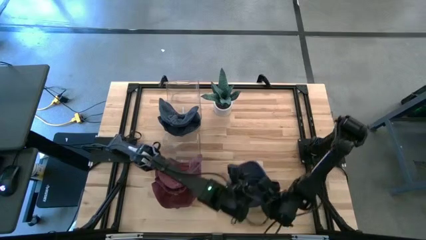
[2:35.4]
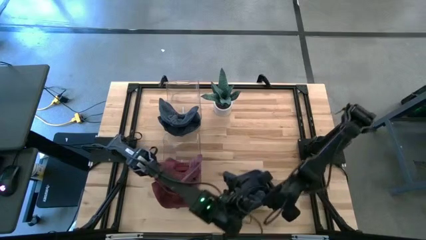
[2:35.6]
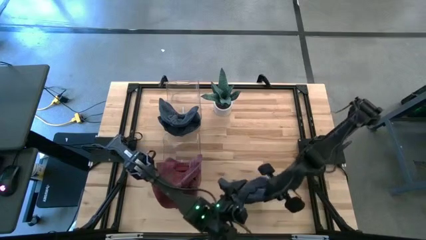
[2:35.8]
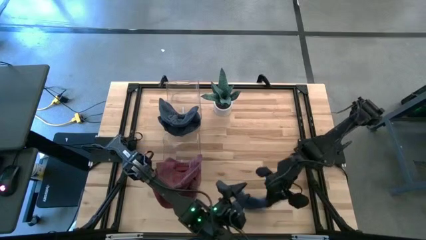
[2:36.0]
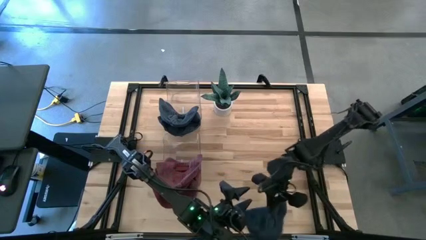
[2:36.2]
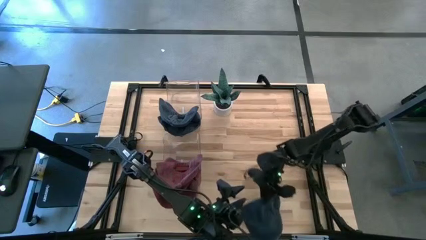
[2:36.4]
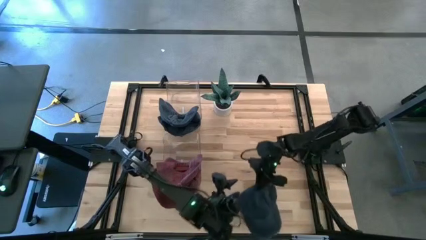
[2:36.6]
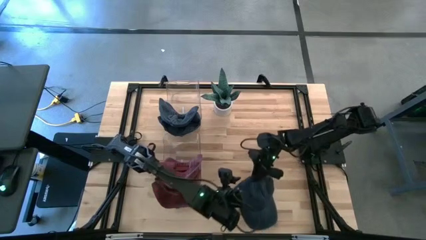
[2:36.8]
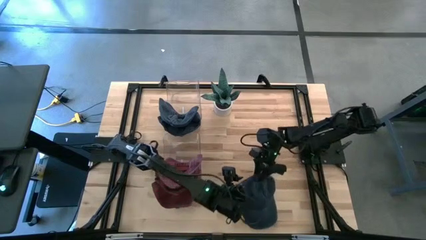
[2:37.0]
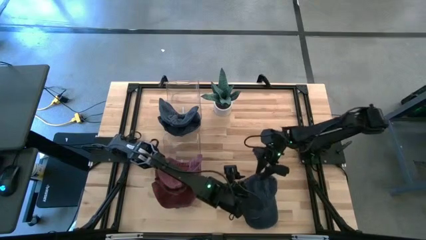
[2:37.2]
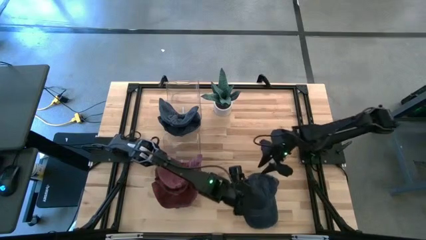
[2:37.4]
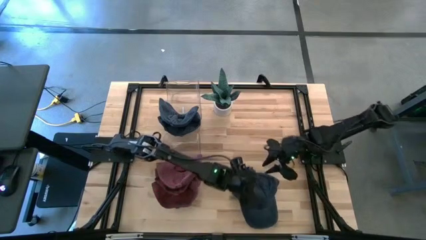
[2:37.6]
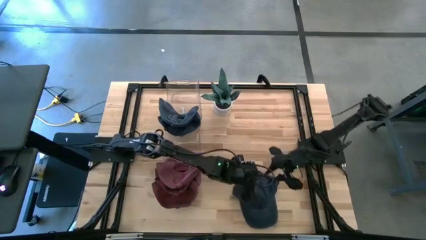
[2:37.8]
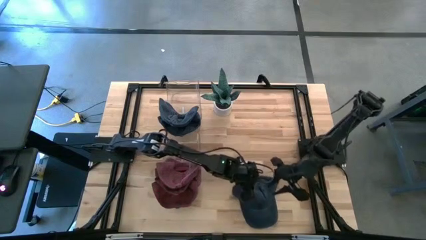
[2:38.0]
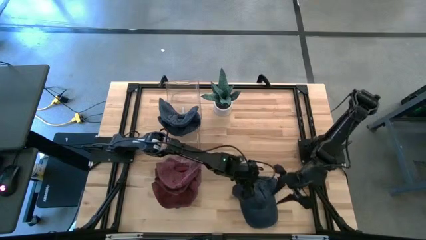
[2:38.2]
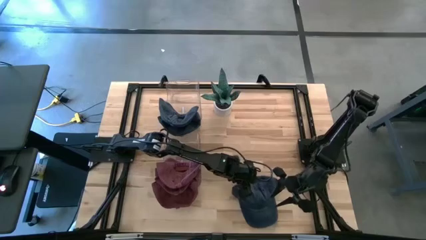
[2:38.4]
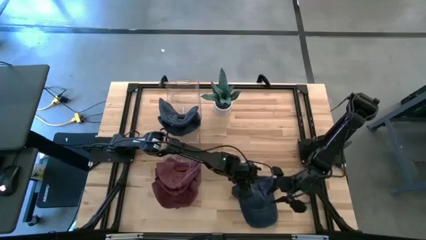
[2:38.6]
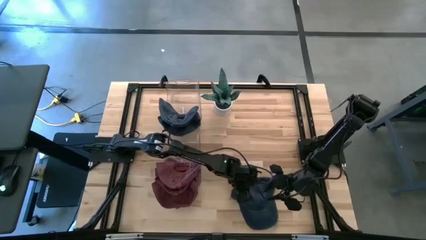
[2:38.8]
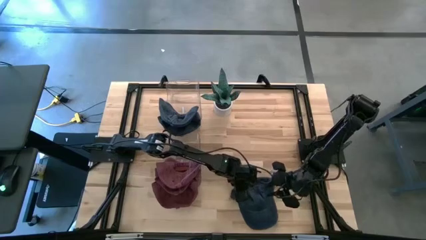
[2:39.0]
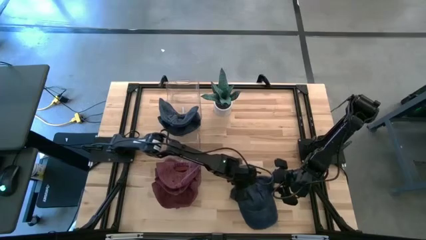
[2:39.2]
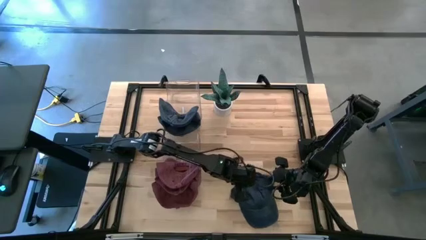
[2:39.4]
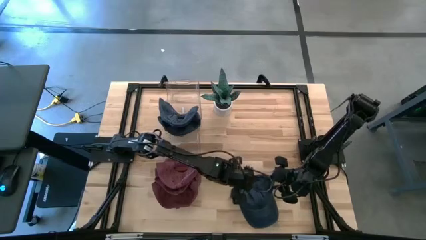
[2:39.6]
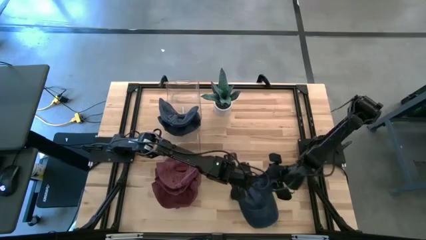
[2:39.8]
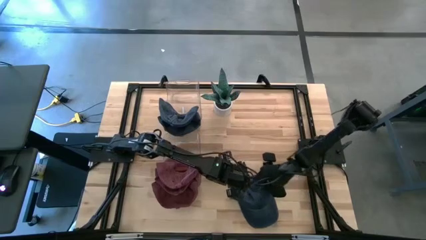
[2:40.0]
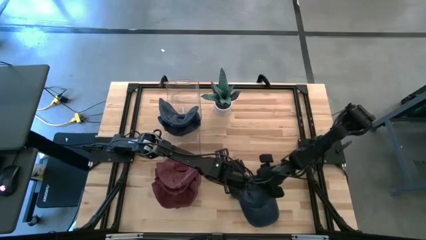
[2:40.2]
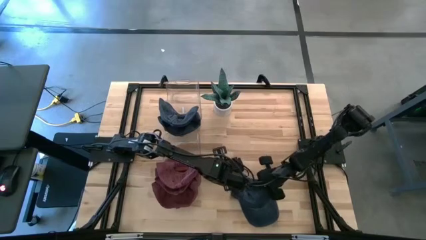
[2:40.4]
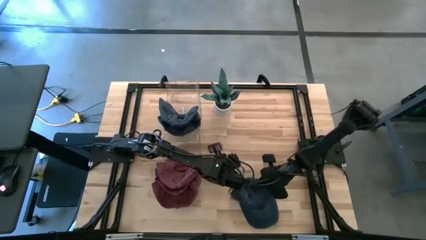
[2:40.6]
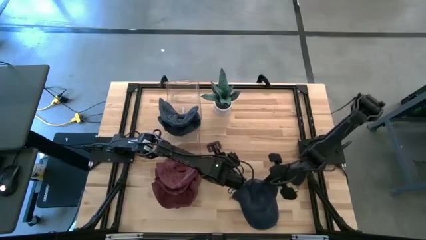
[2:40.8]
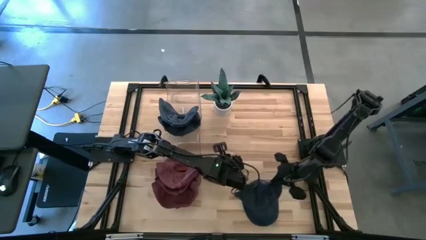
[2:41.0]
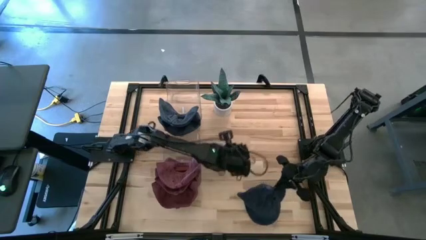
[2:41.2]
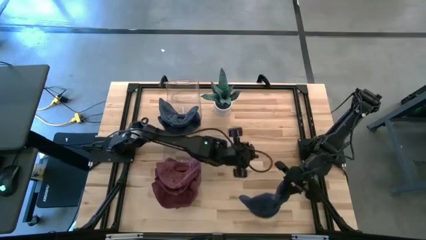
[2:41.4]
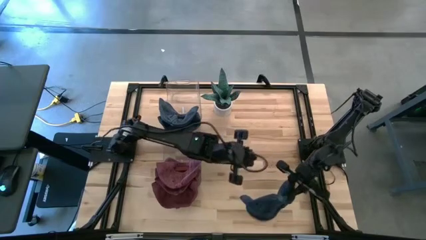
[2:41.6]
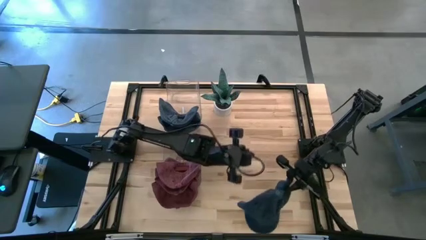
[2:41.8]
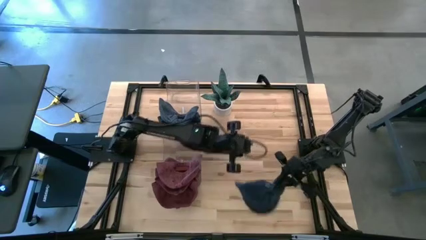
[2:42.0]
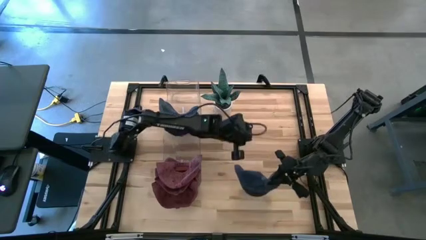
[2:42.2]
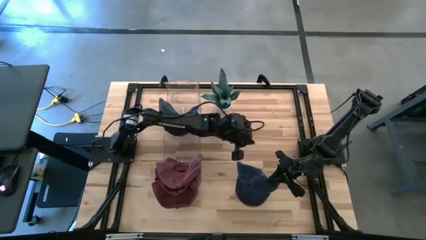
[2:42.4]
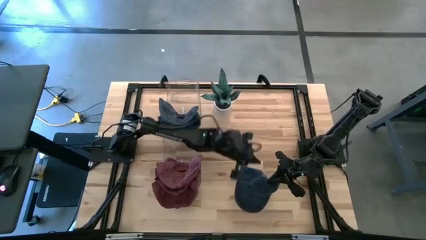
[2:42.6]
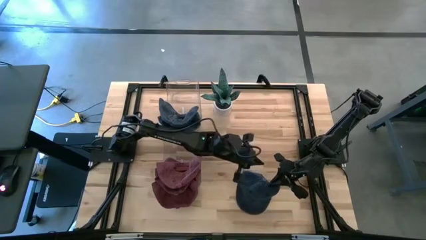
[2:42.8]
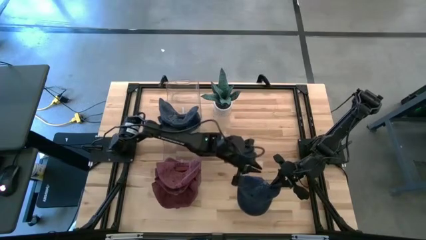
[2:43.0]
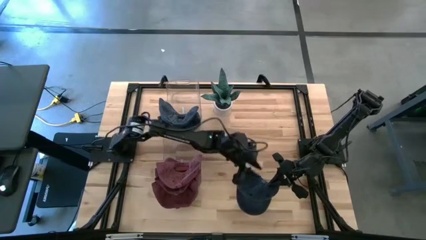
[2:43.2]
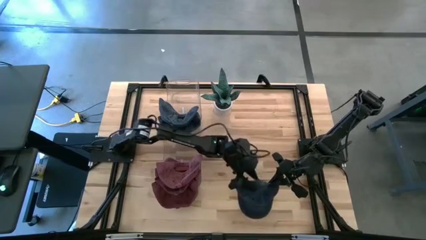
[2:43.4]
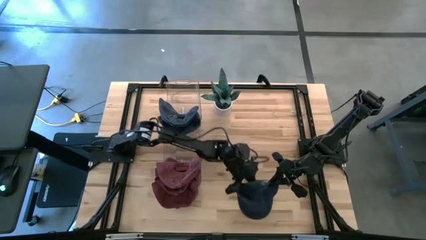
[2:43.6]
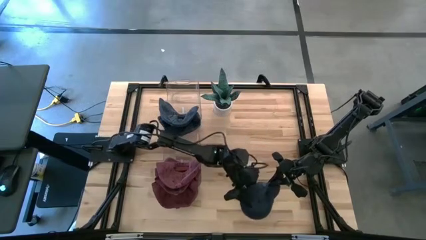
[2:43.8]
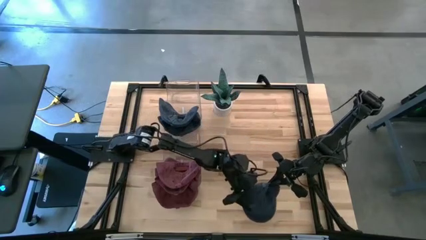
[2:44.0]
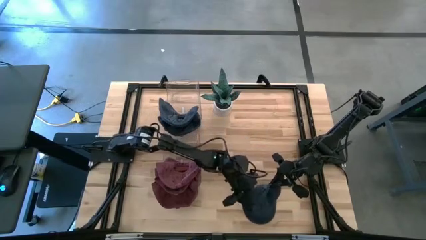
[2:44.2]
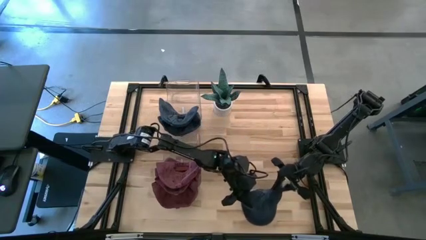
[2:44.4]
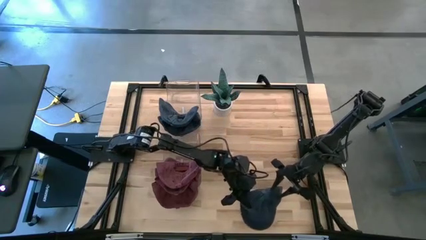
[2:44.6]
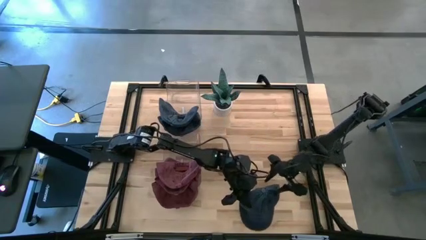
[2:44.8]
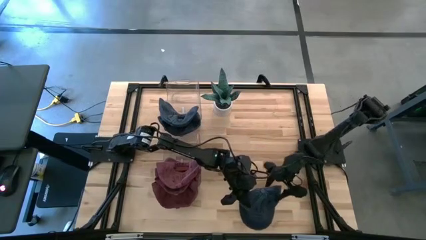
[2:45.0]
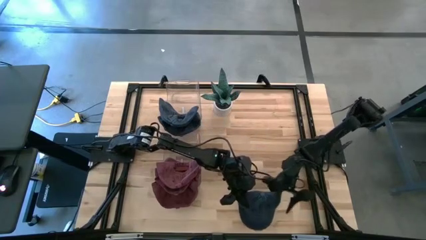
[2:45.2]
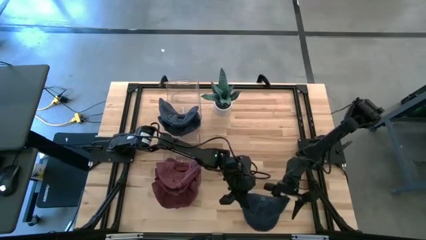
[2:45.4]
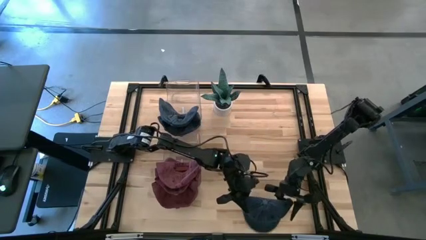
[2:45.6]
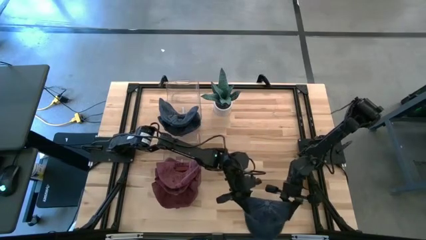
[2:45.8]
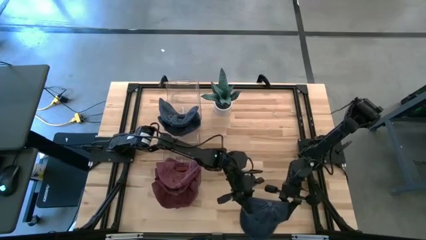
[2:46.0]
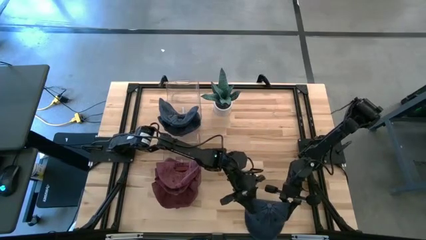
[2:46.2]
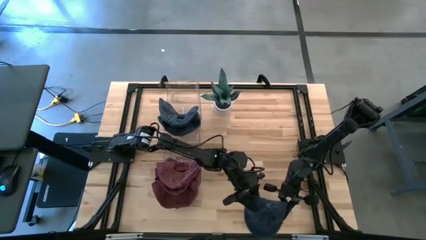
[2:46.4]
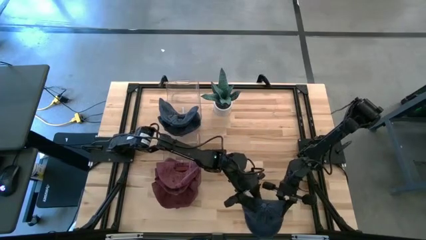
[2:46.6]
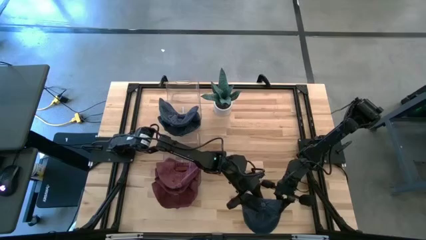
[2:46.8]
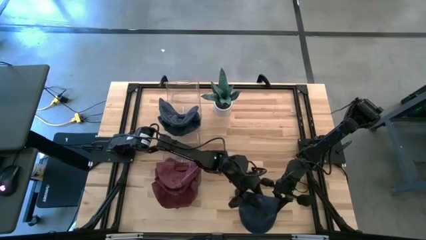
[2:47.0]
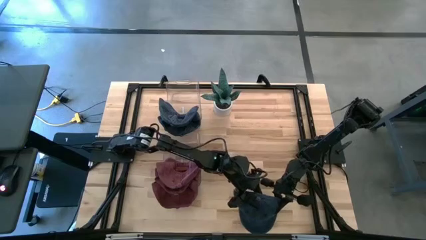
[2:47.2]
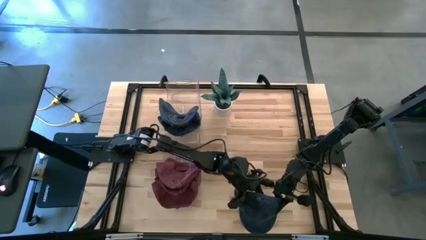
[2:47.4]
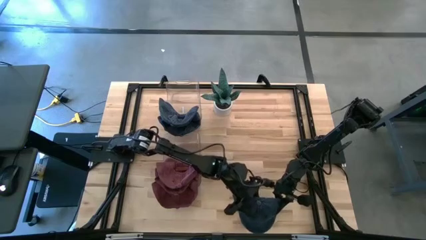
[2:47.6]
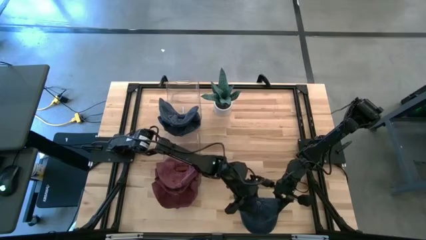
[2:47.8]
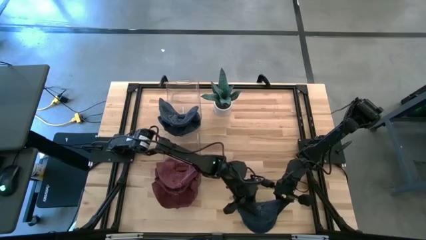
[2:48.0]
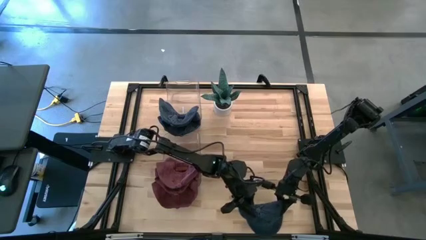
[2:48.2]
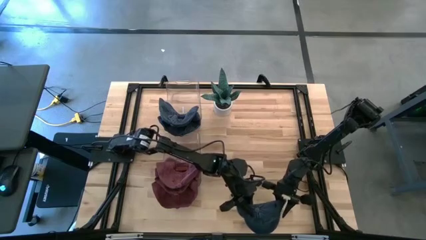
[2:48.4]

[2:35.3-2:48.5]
Task: Pick & Place hat
Put the blue cap into the top transparent bin

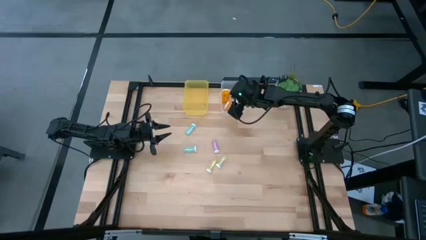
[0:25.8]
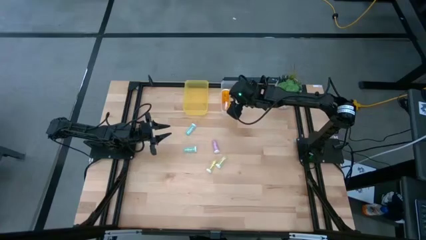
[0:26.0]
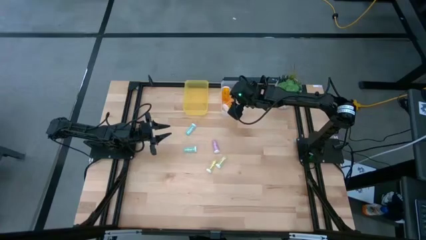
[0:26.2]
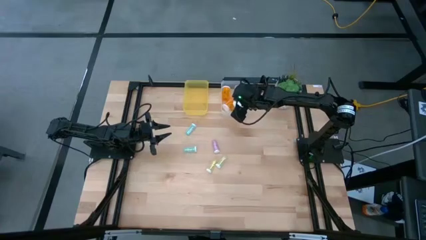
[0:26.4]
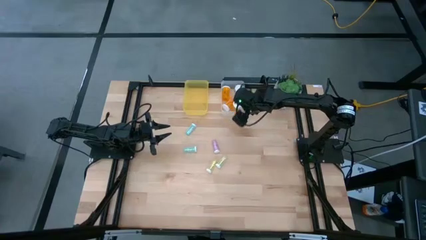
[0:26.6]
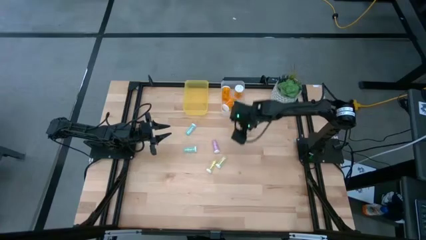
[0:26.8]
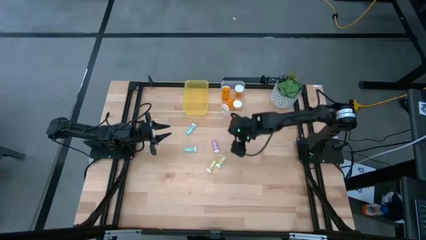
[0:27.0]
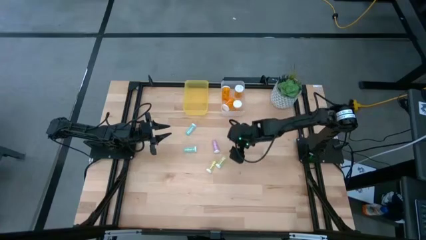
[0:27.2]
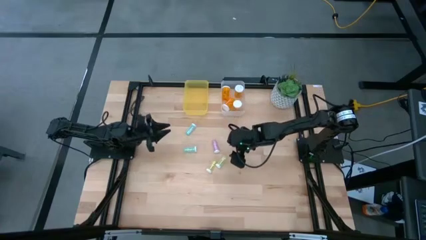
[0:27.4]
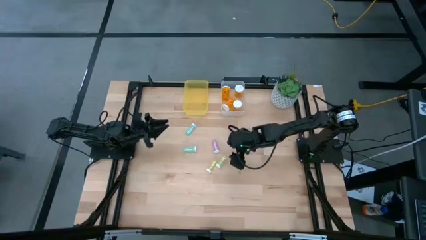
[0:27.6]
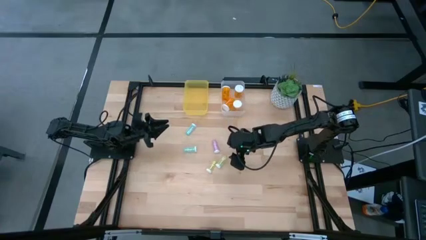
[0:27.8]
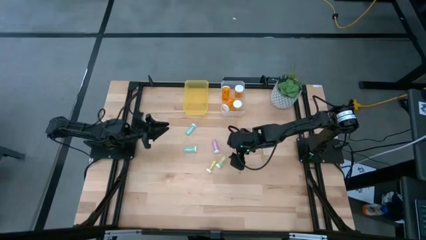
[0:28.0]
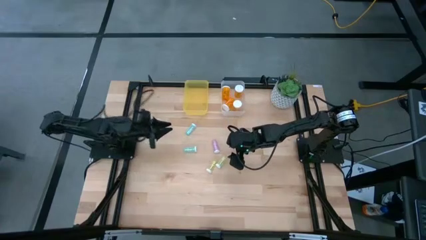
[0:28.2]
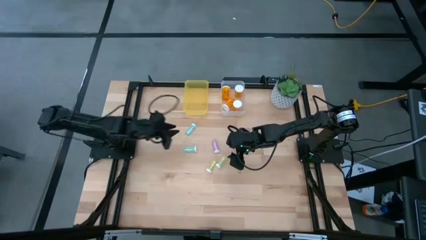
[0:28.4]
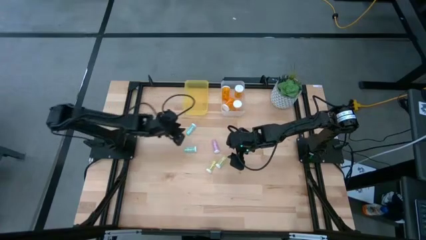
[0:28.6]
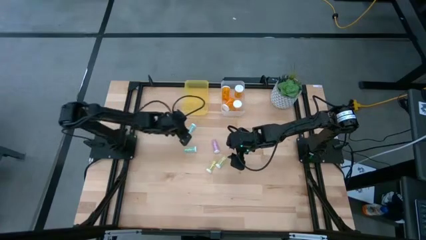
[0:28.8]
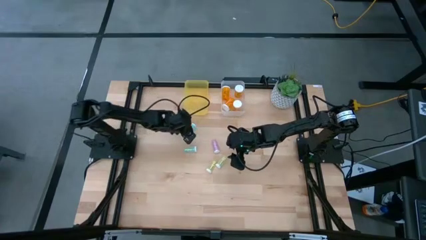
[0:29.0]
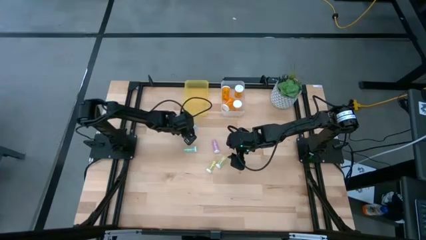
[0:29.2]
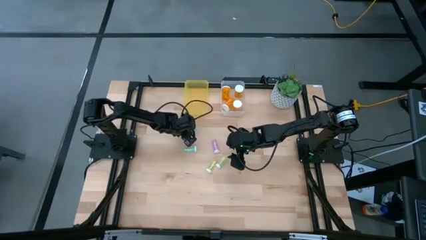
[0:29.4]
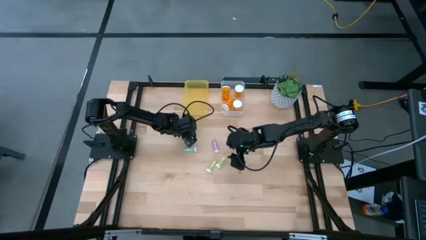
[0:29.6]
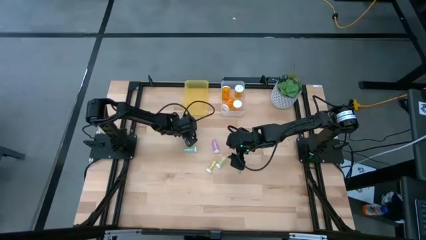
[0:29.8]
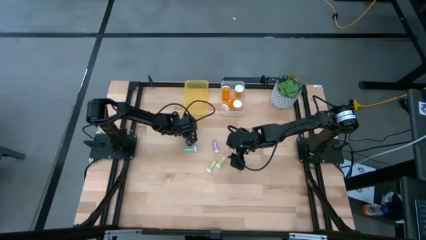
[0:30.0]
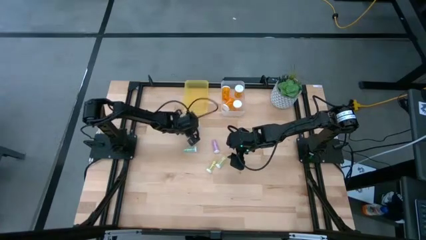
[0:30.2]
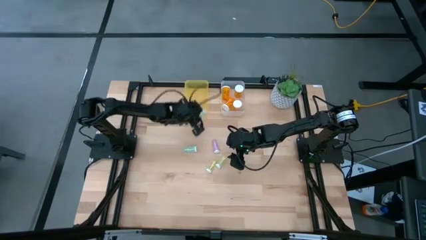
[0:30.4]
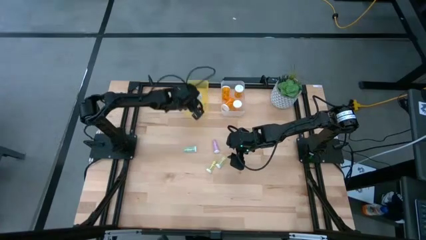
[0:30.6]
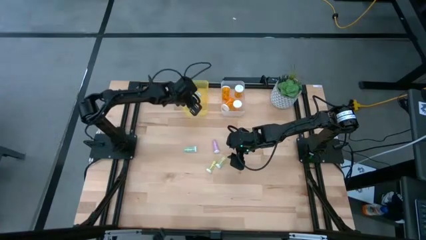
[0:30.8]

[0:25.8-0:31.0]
Task: Pick and place medicine bottles into bin by pill shape (circle, oval)
Put the blue tablet bottle into the yellow bin
